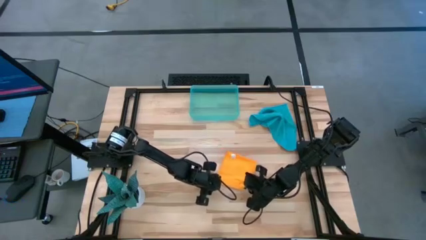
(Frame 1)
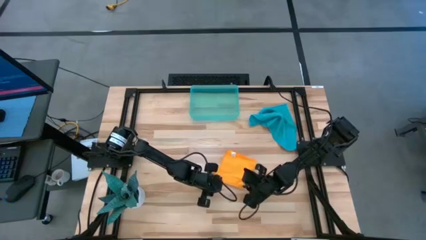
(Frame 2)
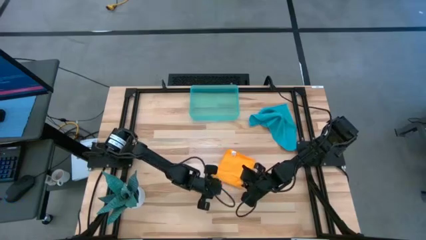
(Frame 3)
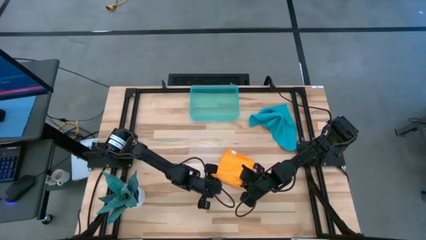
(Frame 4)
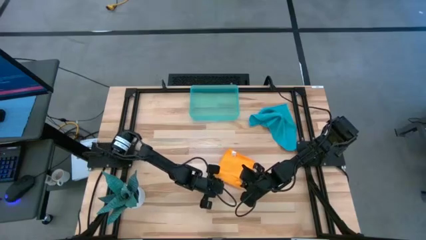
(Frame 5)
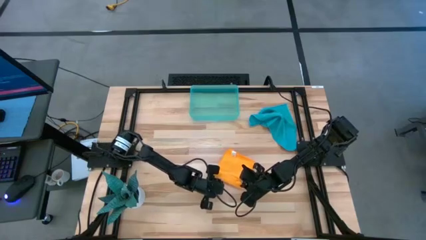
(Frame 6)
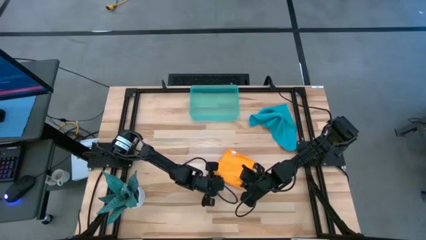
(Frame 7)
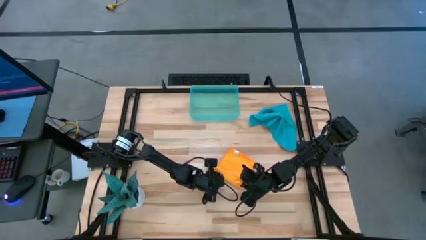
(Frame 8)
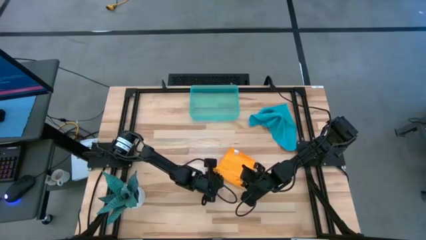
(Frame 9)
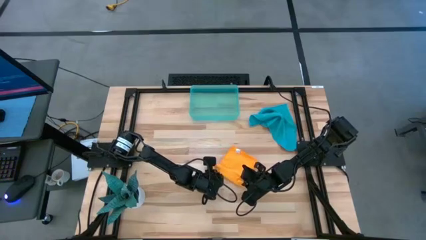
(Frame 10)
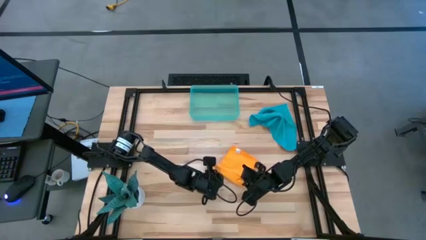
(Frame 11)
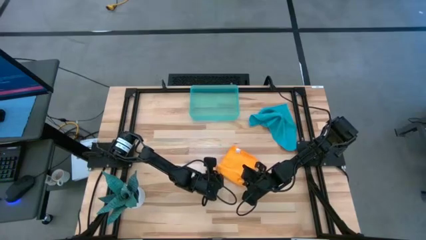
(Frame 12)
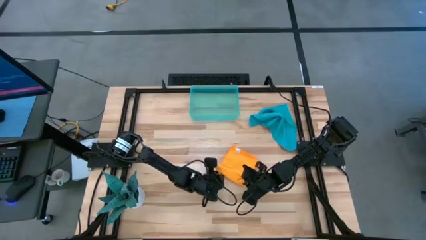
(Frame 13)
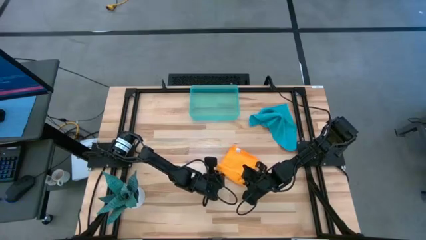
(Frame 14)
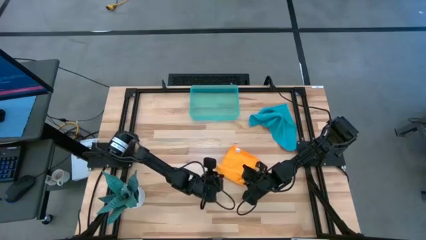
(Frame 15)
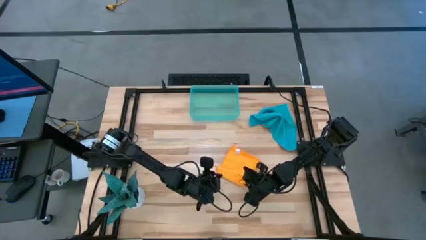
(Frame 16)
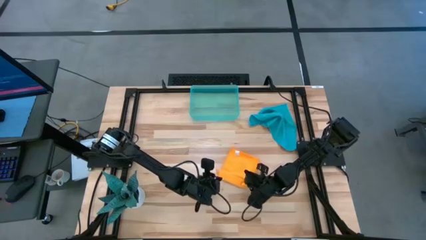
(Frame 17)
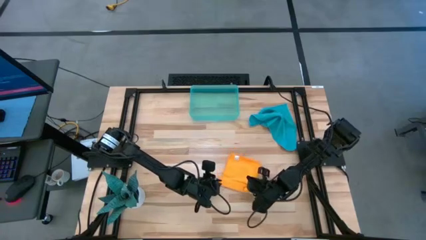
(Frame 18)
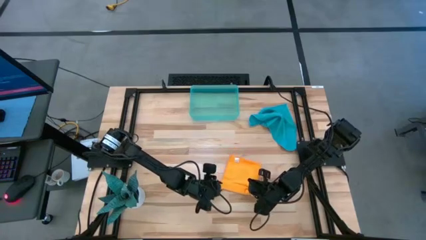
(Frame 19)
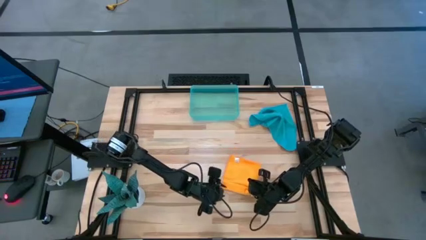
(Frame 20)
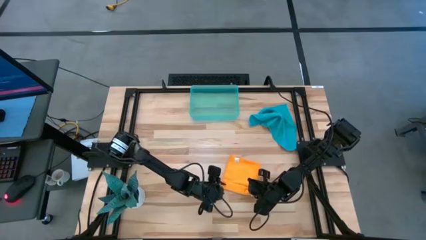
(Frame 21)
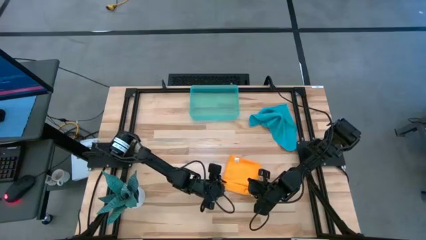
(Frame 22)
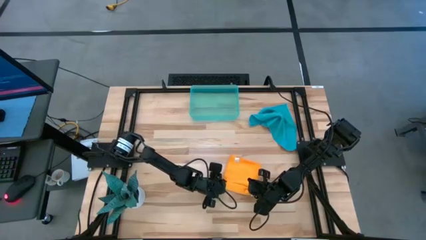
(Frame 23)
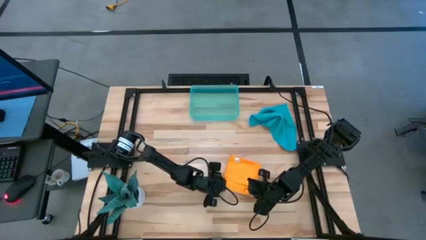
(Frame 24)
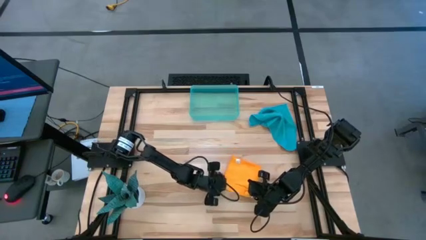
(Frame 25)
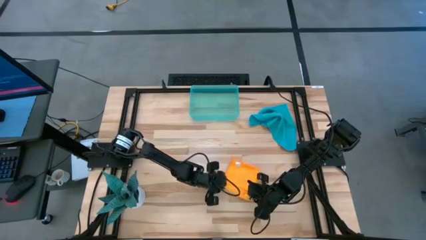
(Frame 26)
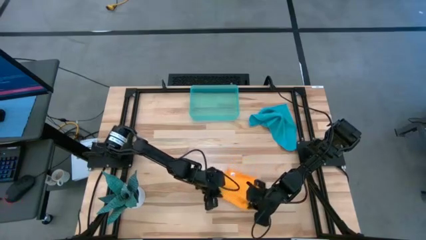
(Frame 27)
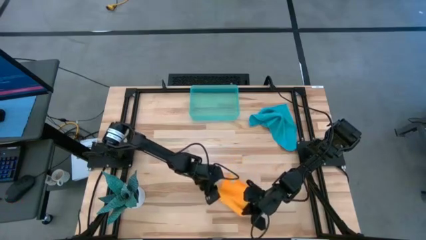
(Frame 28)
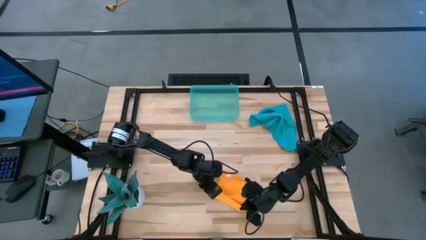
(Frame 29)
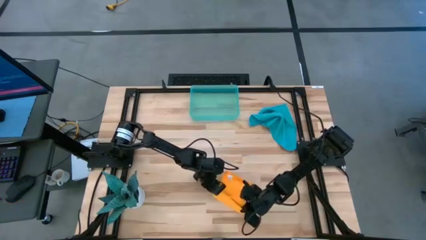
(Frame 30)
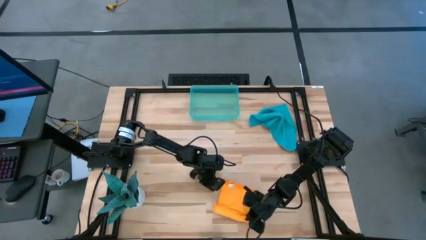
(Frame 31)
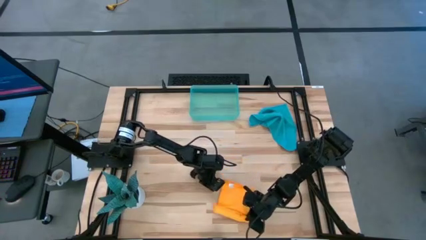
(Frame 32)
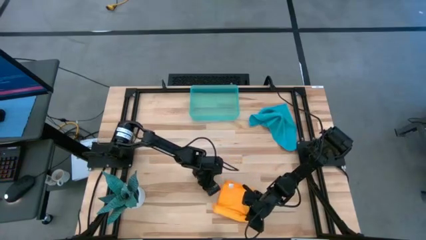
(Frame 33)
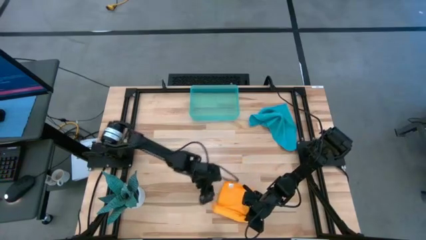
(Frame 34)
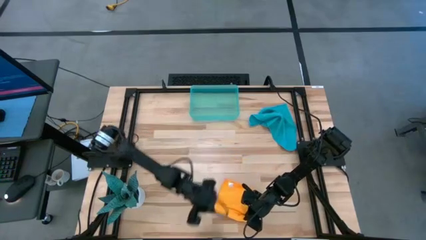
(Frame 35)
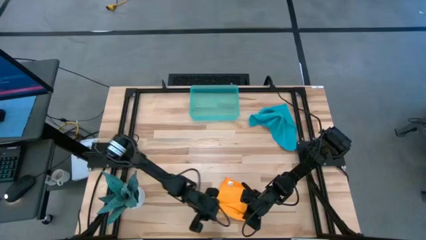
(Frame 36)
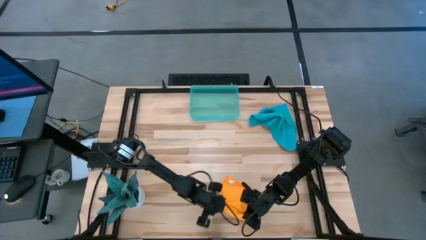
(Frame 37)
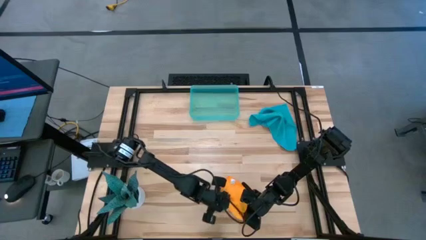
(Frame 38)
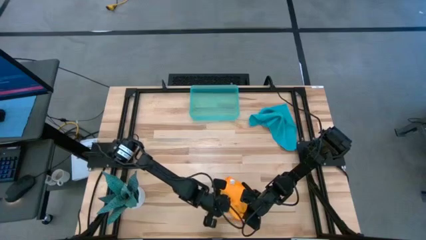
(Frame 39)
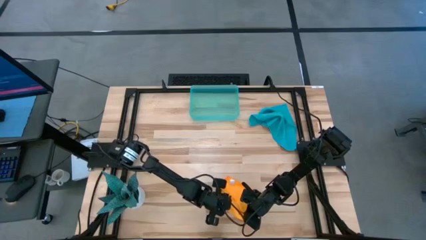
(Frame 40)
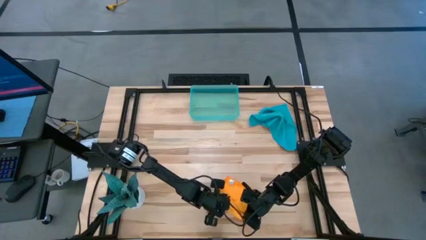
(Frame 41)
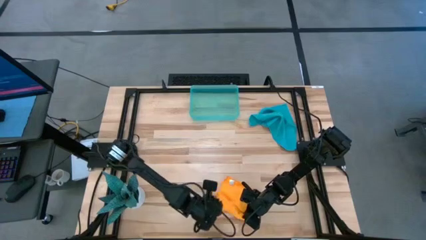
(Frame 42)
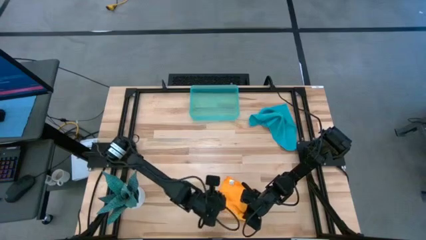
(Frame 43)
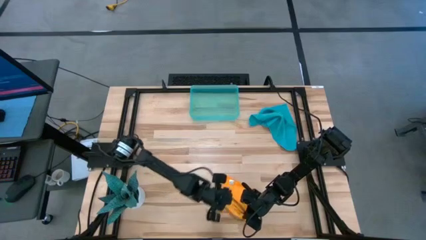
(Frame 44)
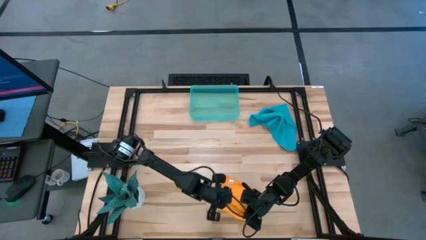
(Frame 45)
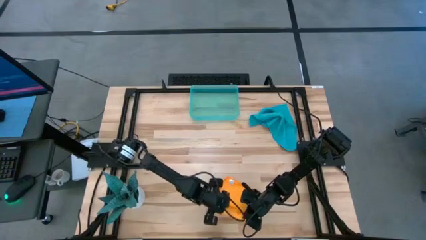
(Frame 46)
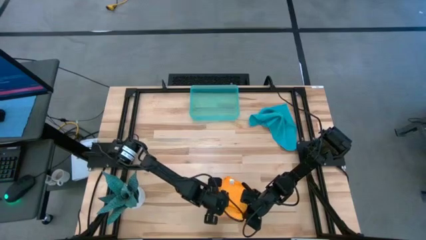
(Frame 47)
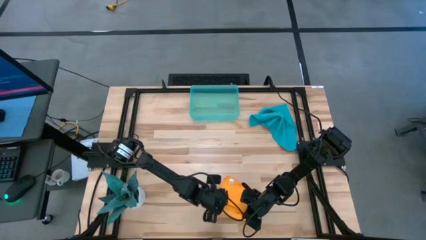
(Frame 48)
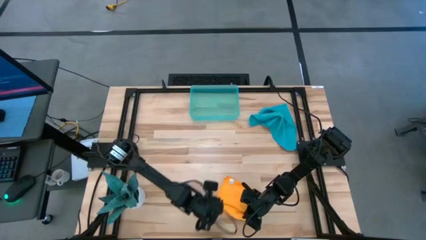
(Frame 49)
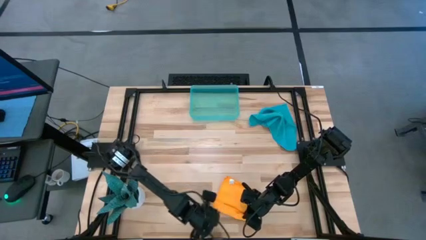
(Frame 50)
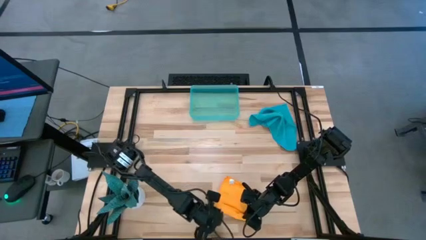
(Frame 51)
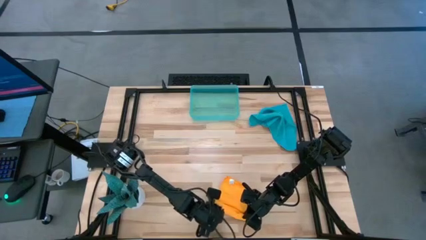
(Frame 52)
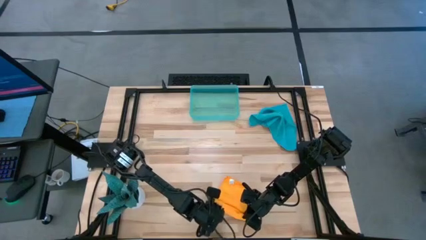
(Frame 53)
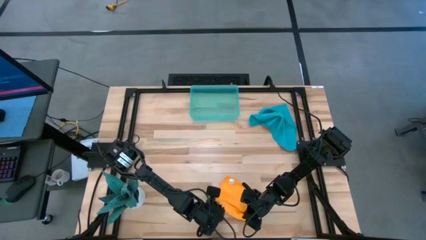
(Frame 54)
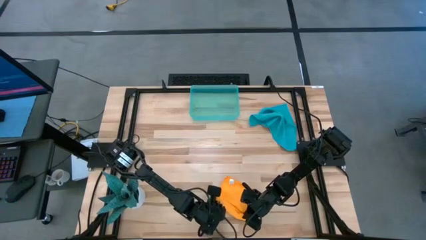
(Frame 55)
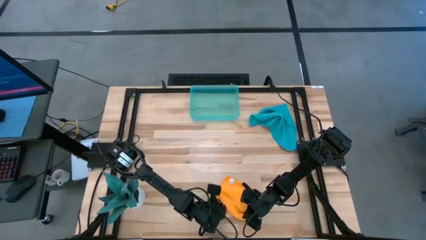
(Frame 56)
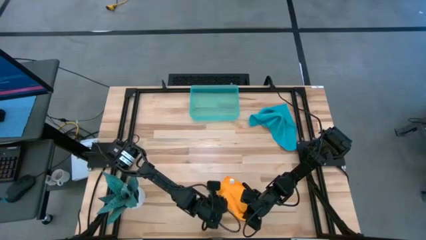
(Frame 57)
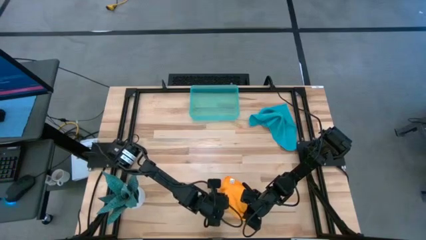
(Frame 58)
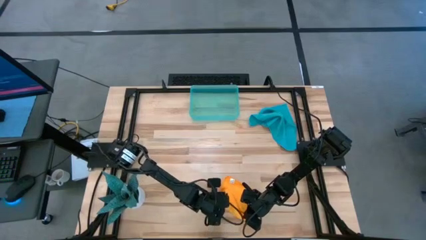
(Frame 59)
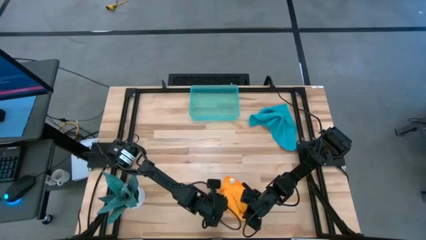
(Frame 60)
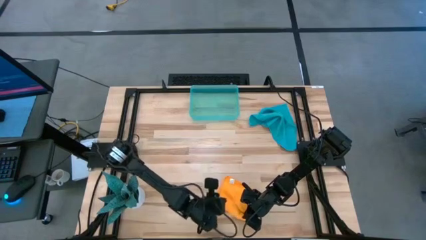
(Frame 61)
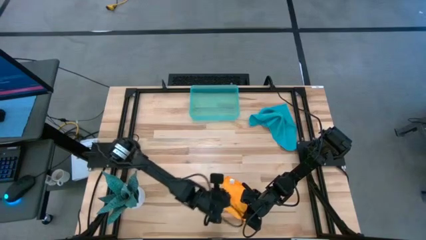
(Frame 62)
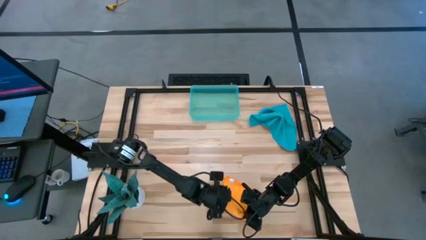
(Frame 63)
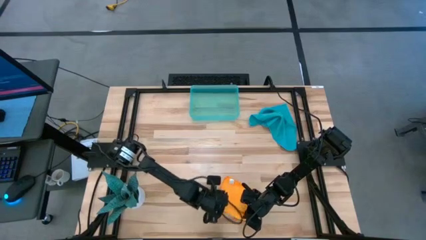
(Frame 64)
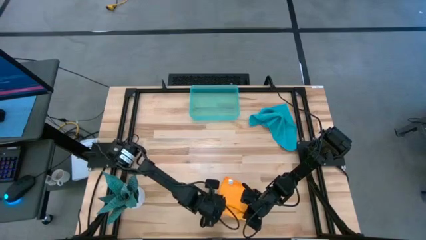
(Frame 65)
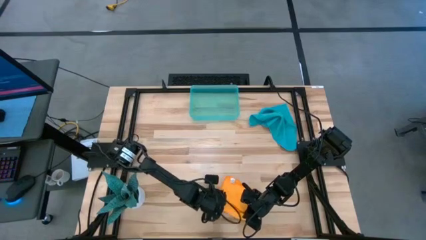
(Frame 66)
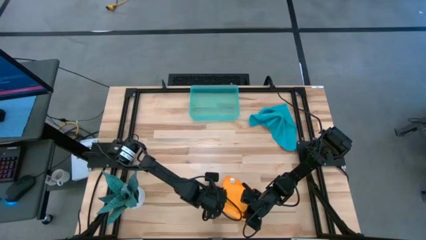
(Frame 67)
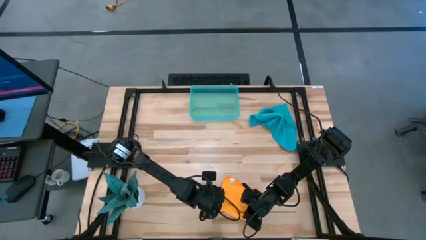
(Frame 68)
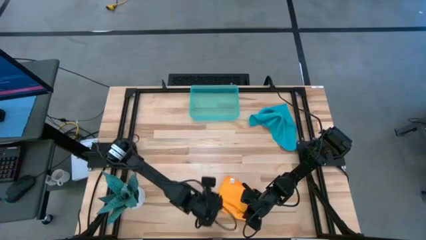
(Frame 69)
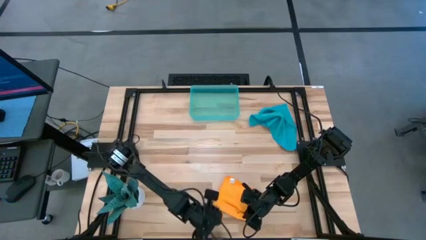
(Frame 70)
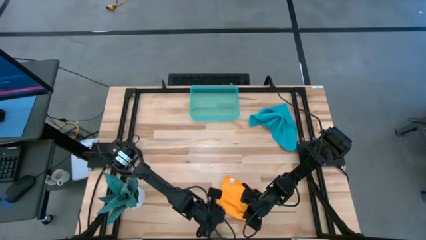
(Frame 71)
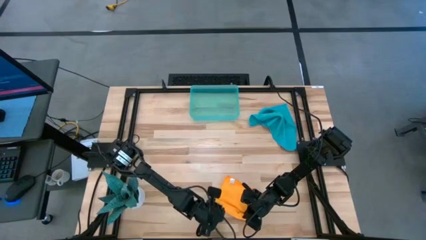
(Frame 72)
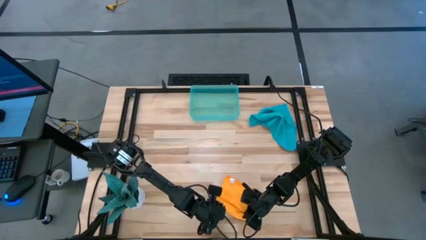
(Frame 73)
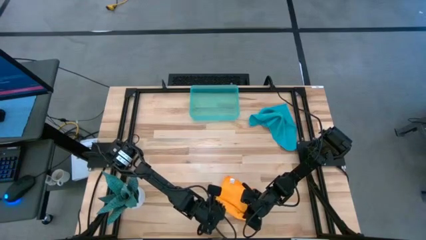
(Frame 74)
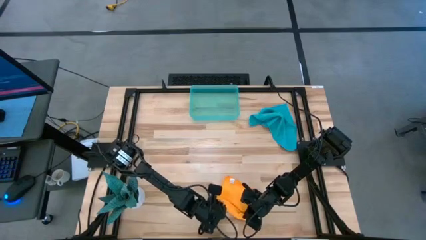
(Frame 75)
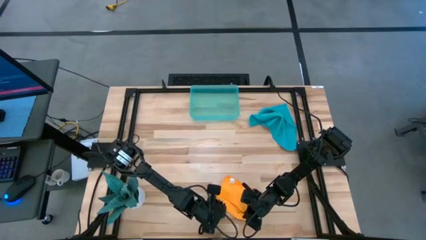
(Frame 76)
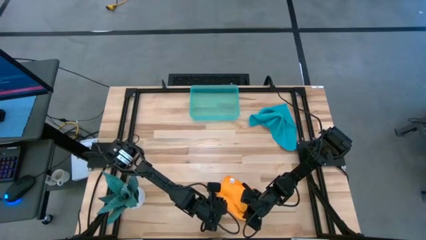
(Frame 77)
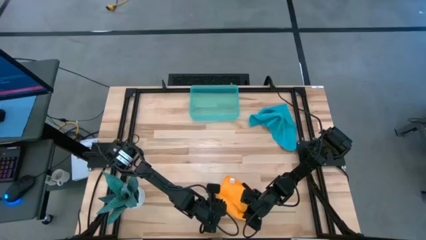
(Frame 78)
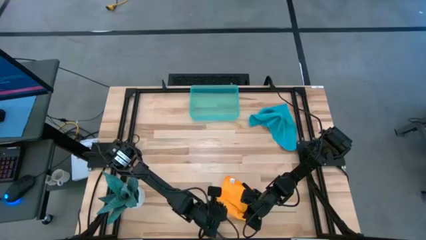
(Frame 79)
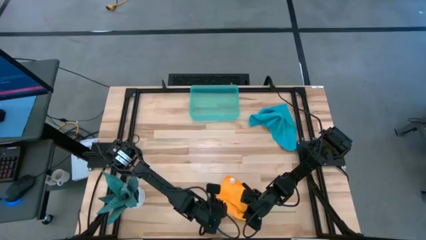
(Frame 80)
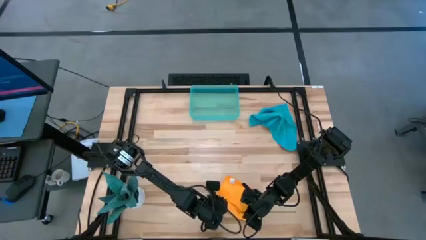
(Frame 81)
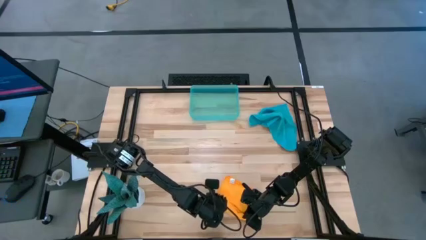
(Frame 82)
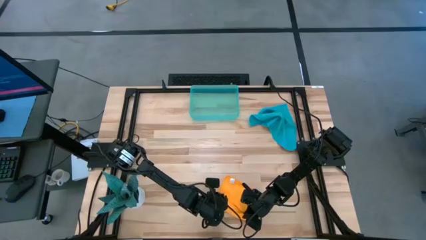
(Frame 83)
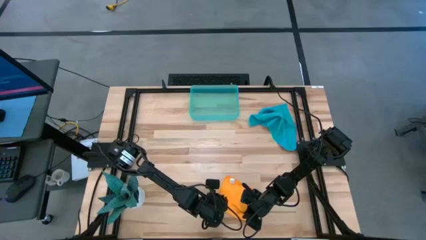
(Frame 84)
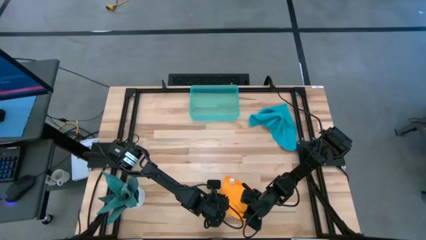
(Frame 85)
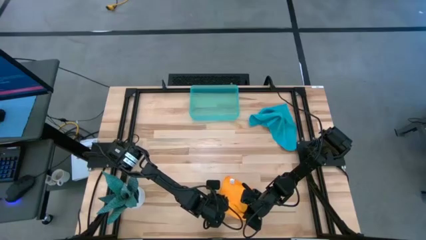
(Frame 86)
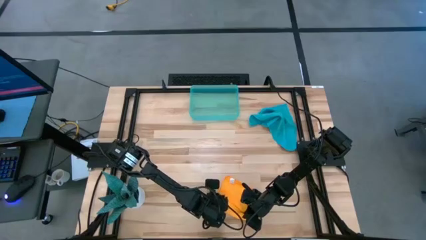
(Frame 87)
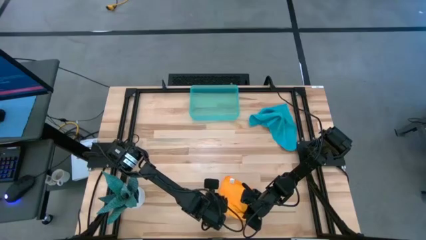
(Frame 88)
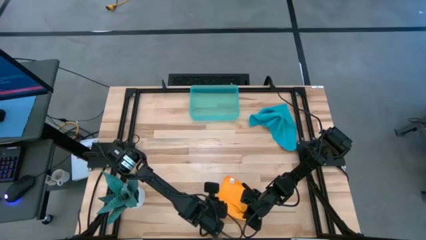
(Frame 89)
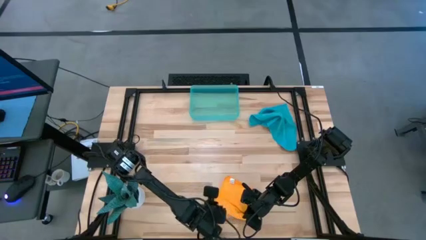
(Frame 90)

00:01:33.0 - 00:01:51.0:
Task: Roll microfiber towels into tight, uniform cylinder then place into a basket
Roll the yellow microfiber cloth on the table
